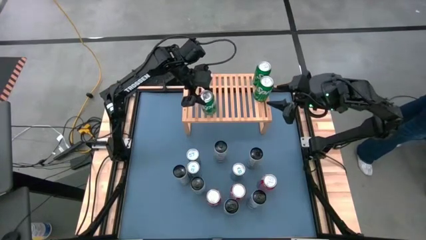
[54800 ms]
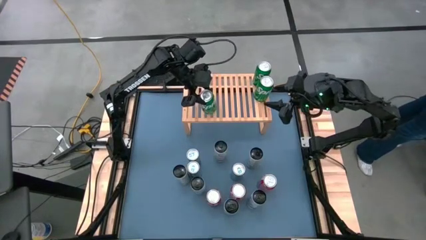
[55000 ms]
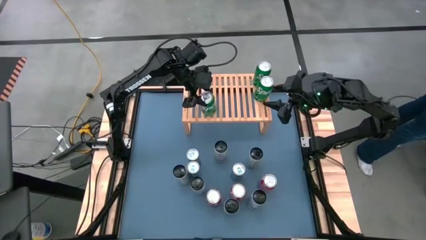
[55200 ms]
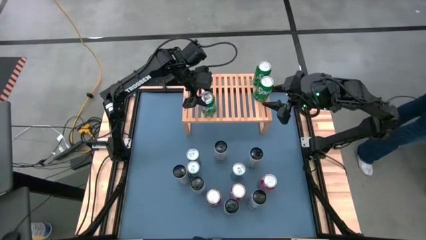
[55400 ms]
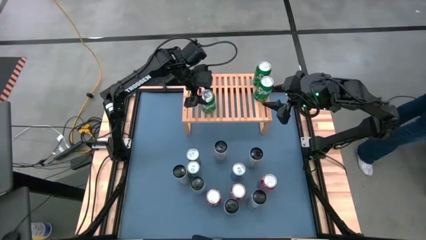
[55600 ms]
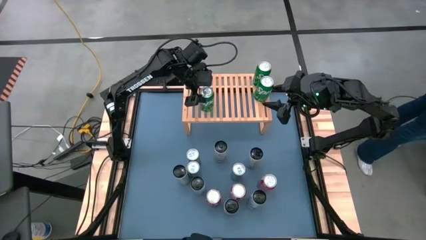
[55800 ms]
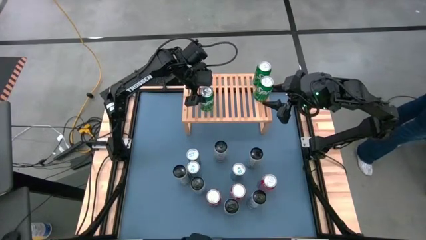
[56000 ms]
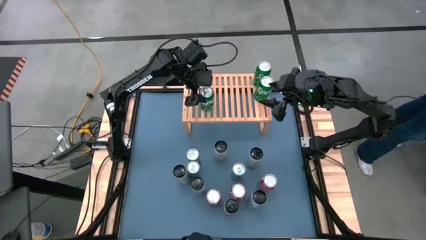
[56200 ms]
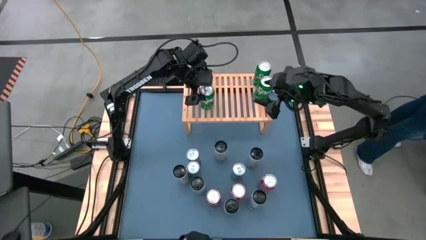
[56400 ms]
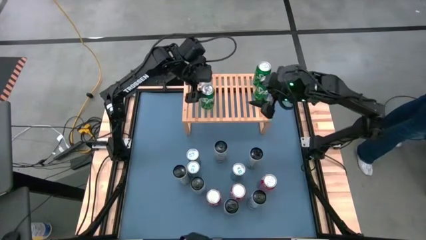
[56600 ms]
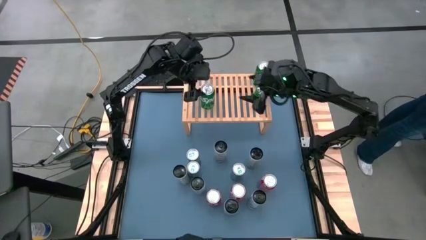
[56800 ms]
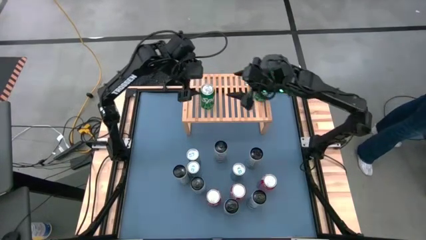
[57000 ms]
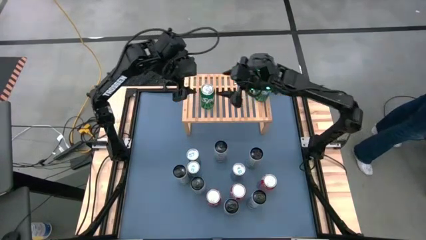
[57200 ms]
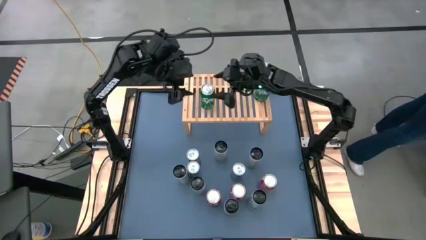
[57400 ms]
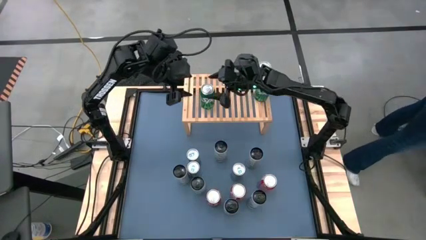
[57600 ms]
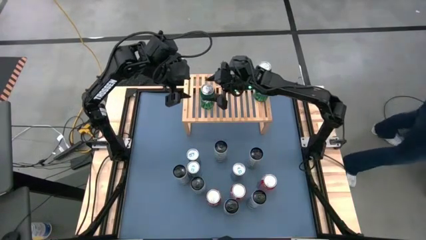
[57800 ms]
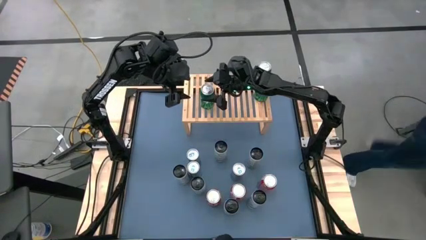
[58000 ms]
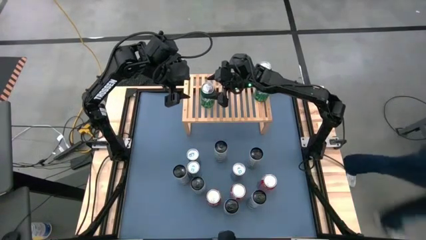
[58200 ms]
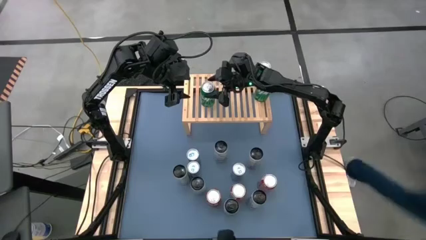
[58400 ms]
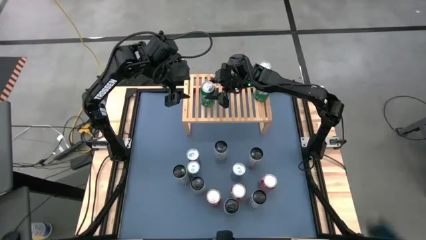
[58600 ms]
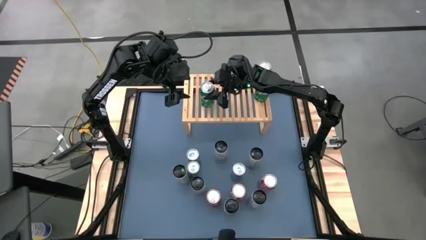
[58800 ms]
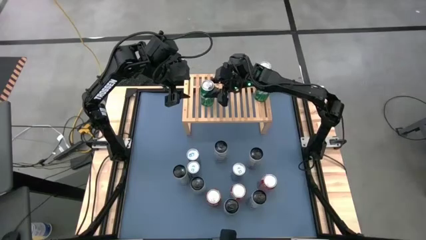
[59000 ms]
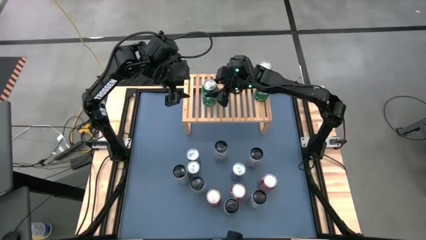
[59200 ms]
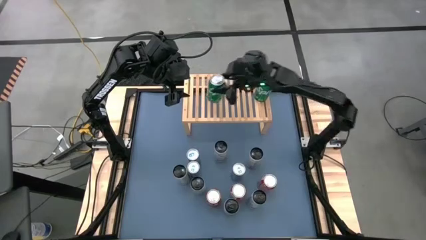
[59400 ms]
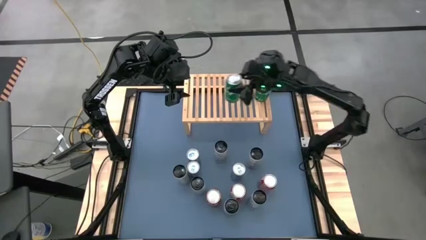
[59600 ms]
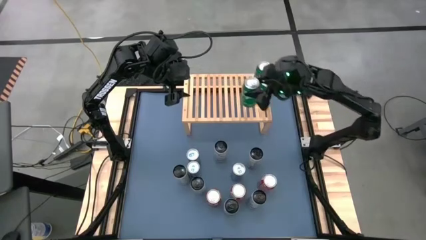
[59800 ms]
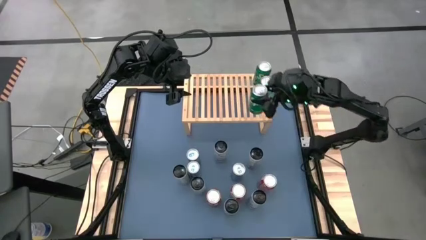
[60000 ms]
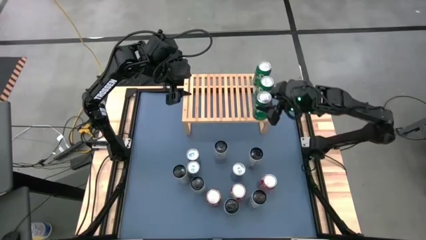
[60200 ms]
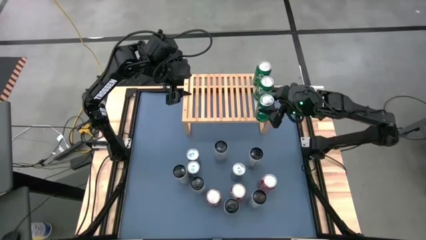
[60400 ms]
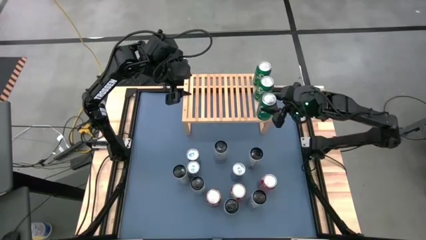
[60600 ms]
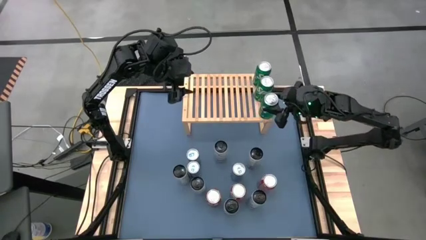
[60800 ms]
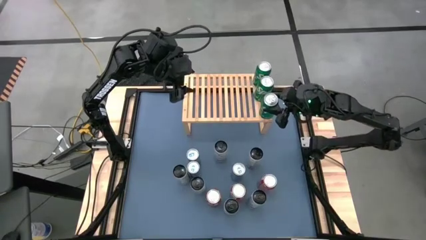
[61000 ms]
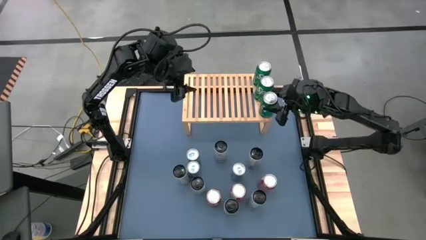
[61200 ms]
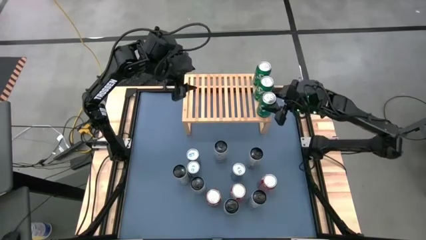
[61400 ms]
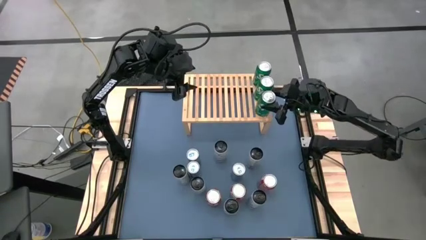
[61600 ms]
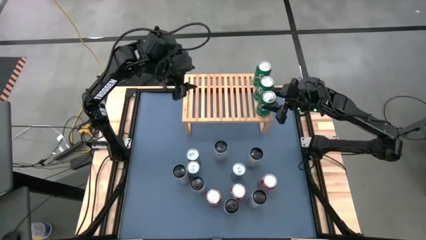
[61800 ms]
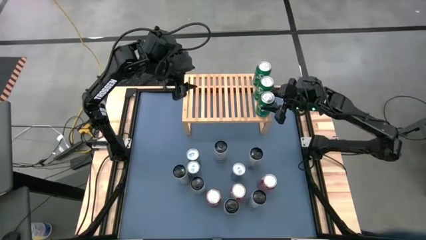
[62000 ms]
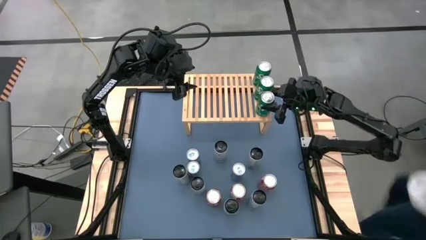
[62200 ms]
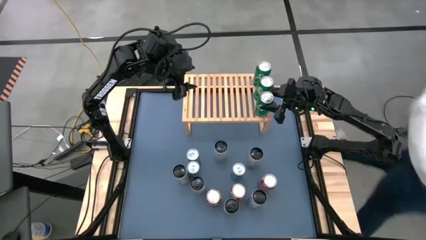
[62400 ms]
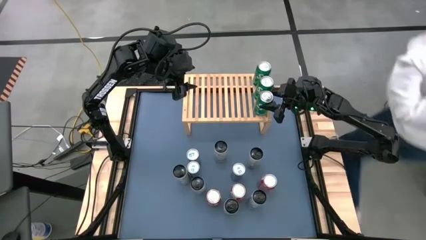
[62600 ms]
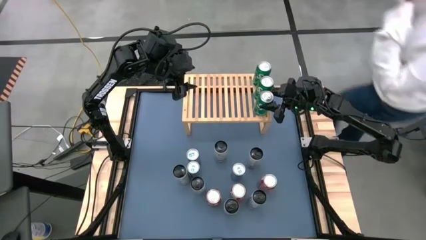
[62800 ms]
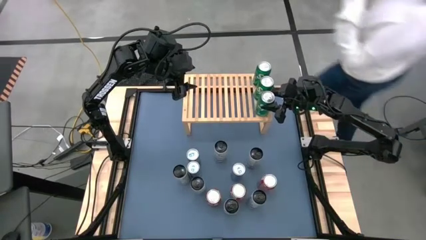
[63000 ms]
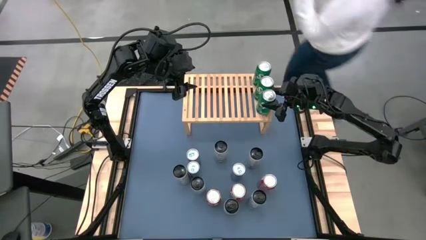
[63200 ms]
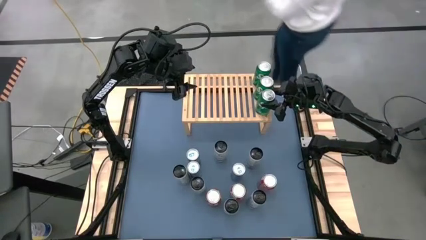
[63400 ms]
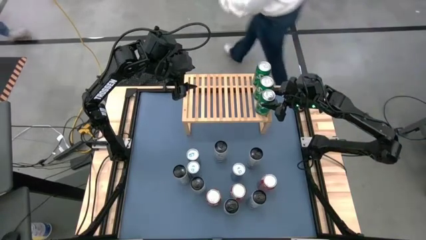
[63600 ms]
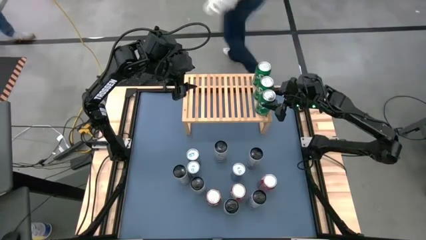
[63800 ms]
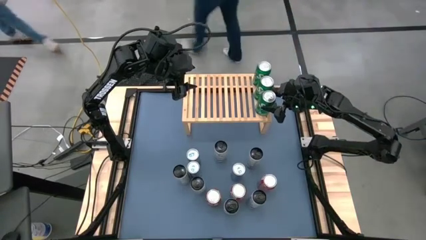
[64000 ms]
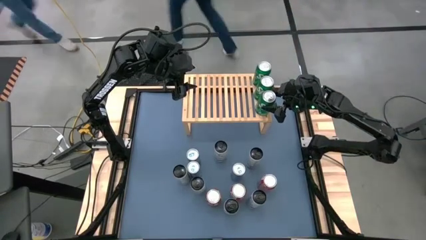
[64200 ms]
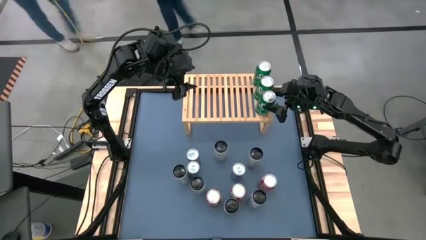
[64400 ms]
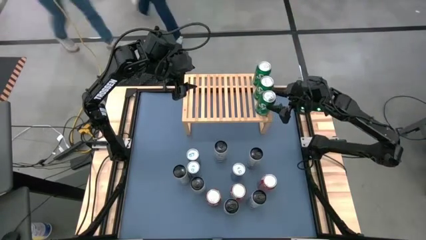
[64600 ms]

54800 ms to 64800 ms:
Task: Place canned beverage on shelf
Put the green soda can on the shelf aligned with the other green soda can
